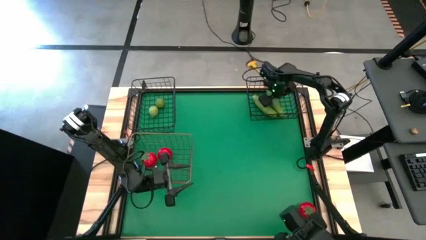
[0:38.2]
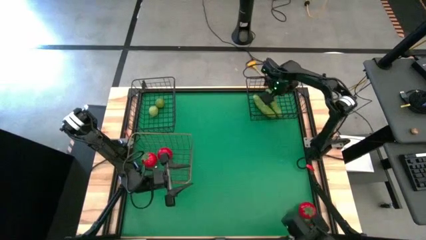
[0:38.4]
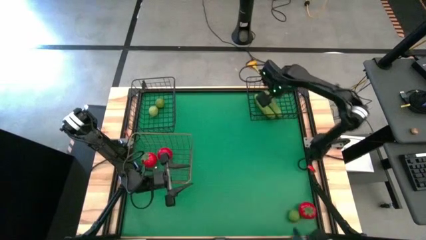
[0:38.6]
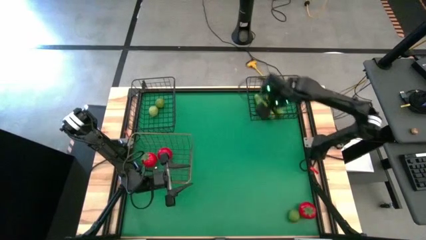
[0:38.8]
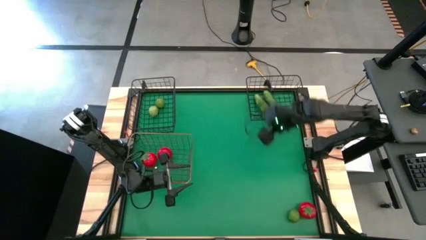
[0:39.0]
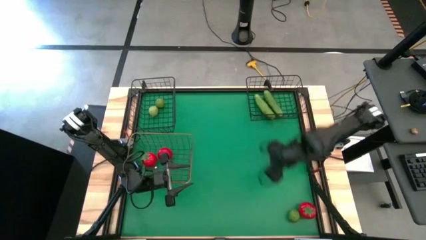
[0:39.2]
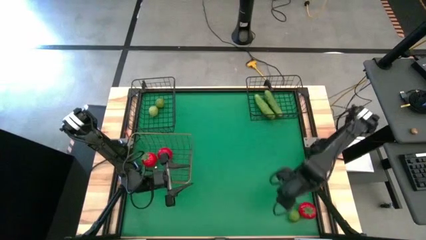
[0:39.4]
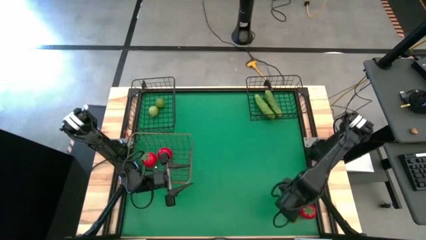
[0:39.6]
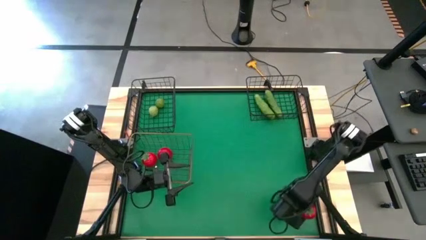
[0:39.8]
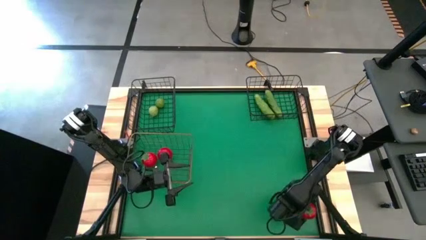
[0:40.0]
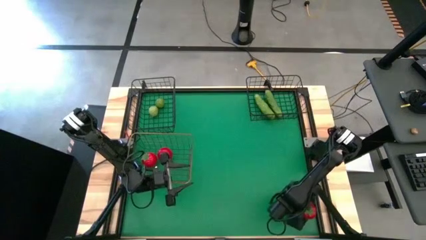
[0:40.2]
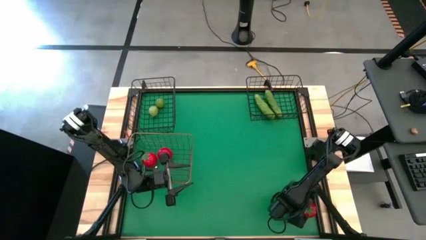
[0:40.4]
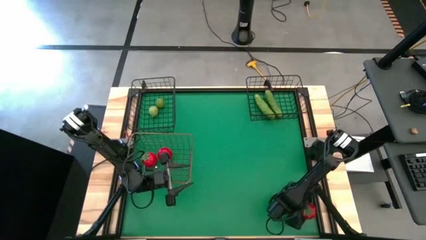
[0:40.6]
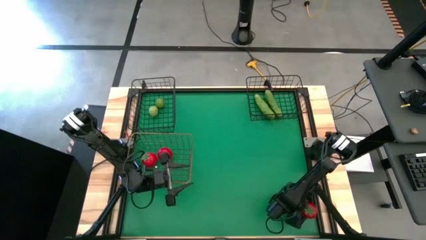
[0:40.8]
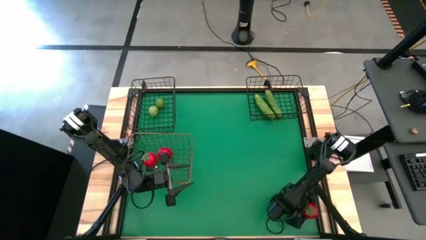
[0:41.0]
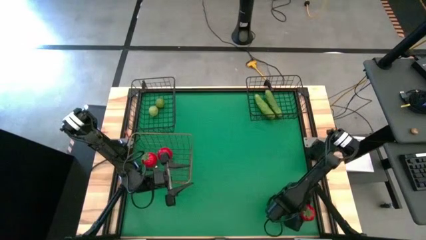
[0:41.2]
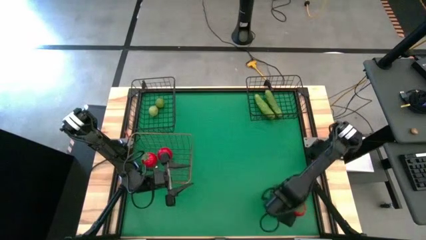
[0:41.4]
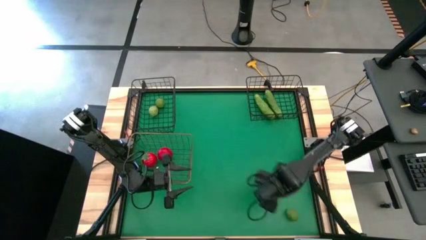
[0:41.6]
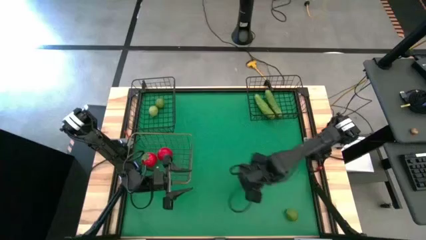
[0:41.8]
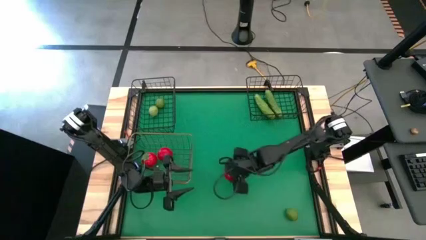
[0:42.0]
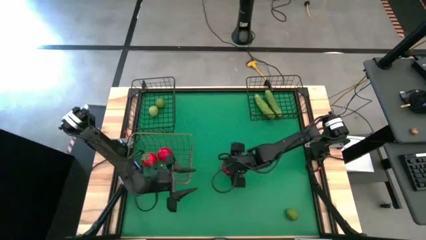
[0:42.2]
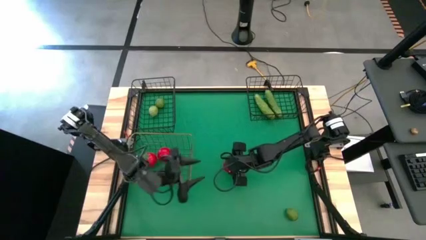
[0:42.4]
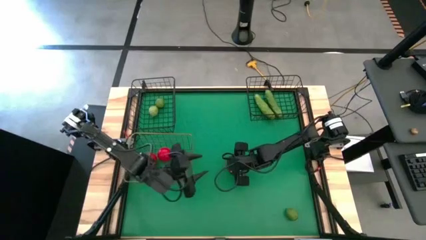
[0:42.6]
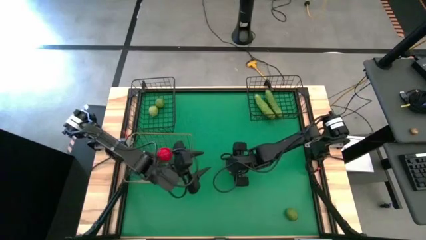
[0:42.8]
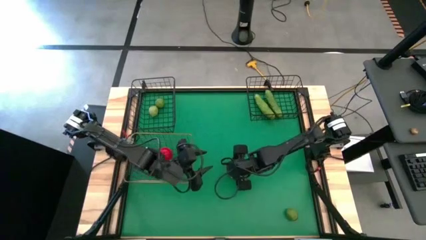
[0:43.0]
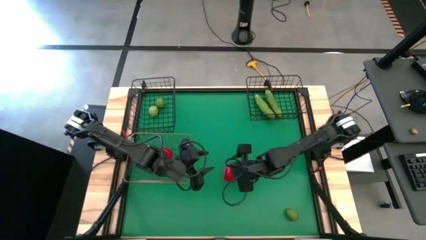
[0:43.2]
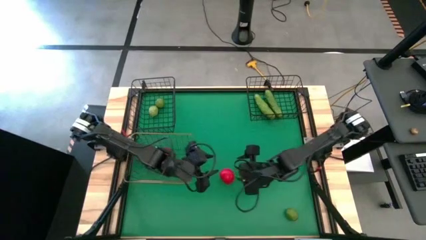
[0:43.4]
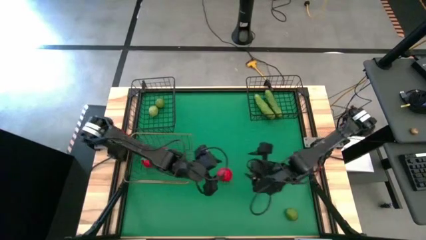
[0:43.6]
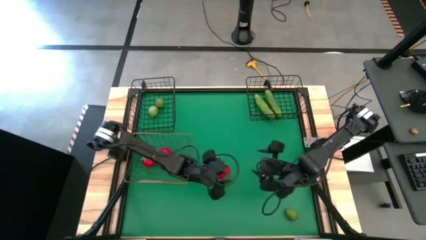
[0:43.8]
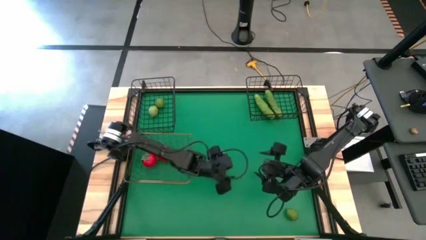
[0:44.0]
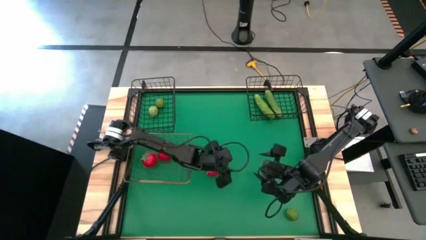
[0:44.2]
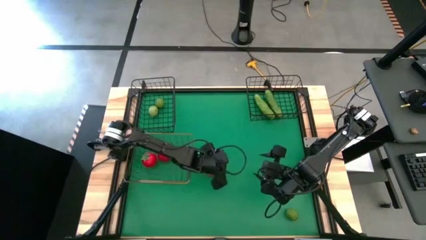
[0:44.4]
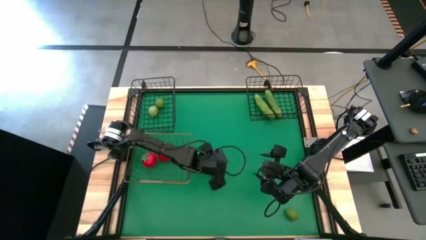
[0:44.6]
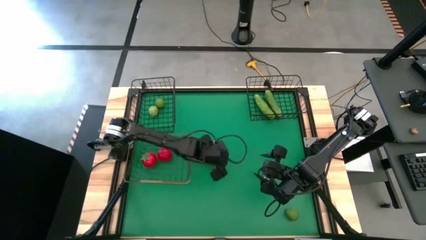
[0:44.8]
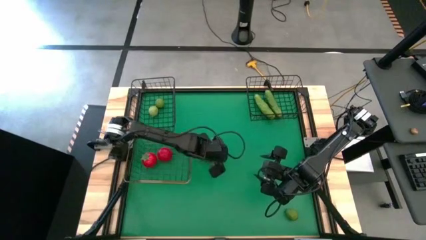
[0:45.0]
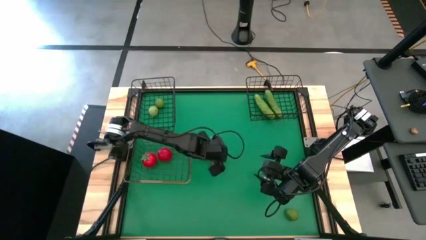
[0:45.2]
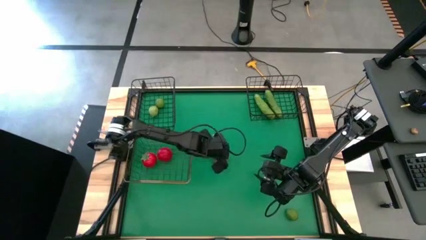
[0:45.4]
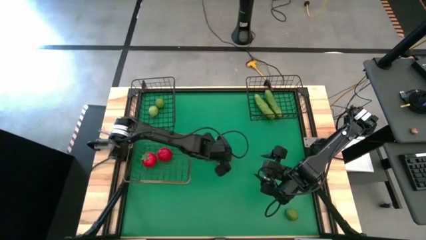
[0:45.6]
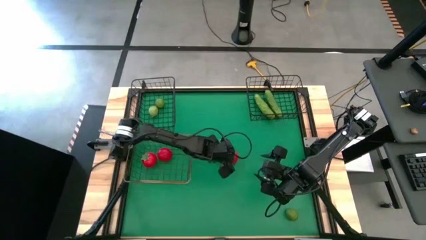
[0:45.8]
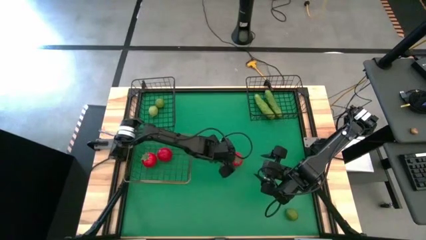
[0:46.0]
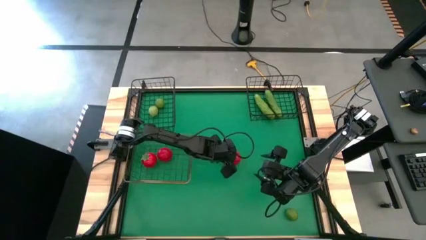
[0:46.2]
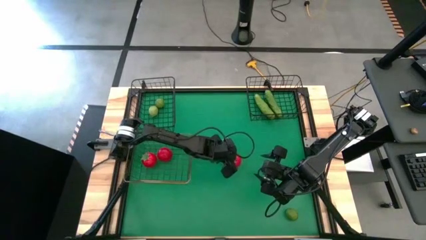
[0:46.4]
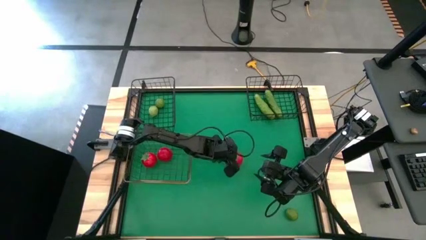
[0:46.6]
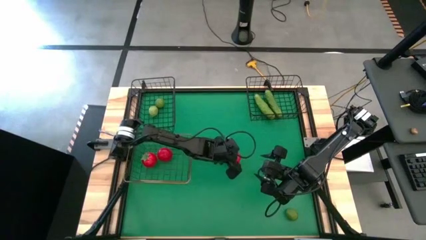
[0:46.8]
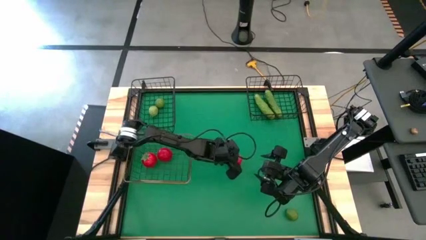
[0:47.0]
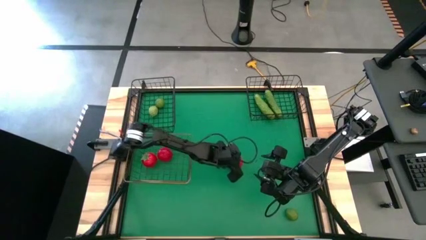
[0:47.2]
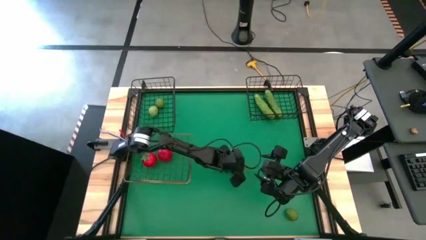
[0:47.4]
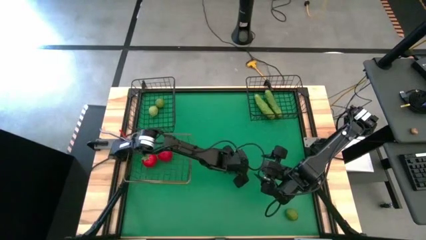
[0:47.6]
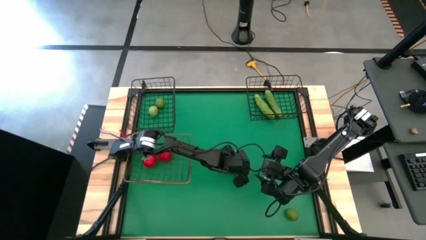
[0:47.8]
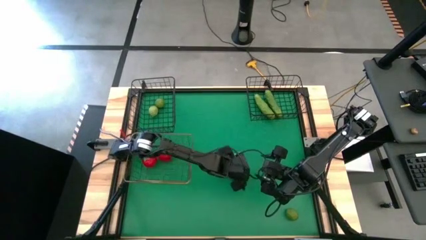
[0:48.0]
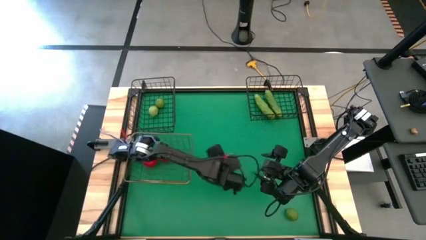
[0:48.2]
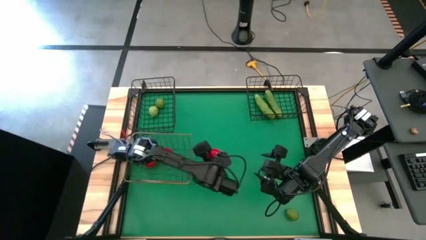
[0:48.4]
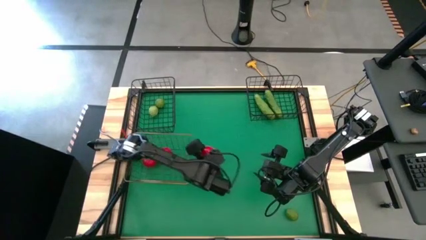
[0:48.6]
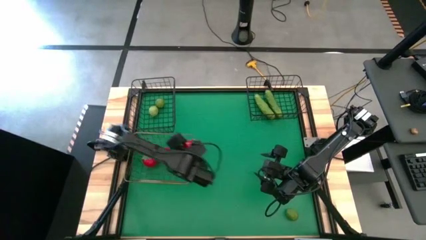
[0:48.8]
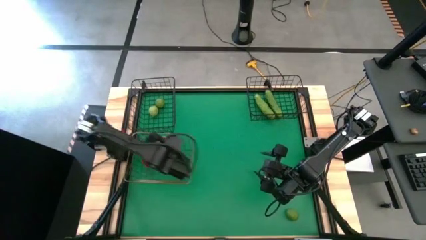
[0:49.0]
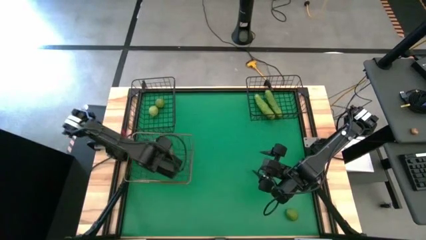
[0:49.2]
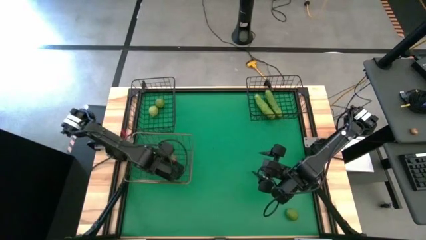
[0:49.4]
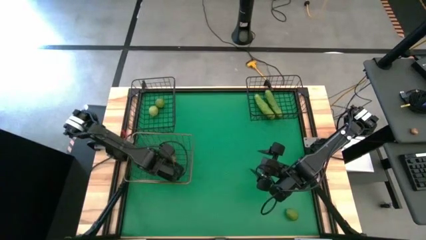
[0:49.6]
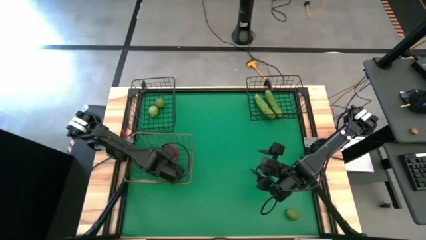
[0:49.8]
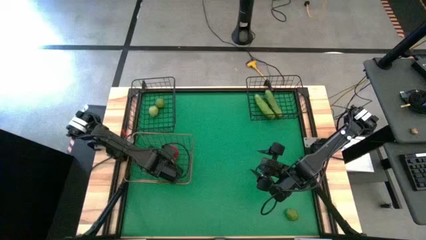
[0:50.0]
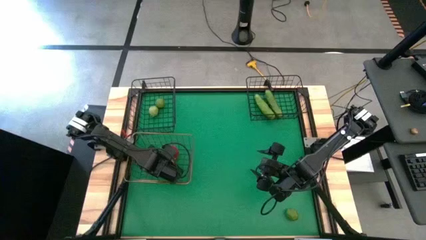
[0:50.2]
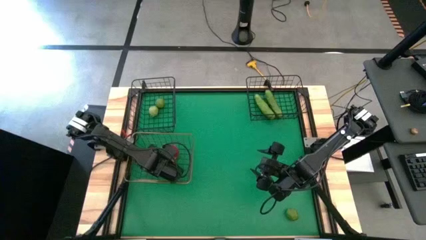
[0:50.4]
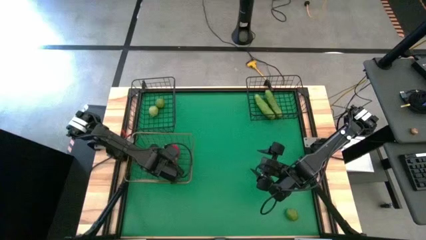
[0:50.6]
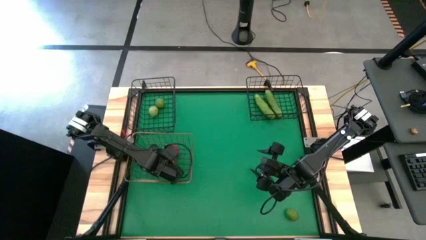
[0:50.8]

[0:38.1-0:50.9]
Task: Sort produce into baskets
Put the tomato into the golden wire basket

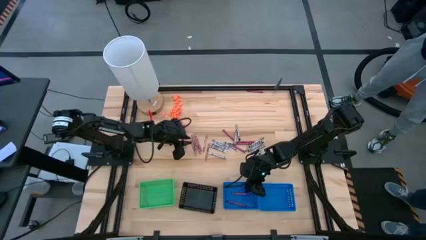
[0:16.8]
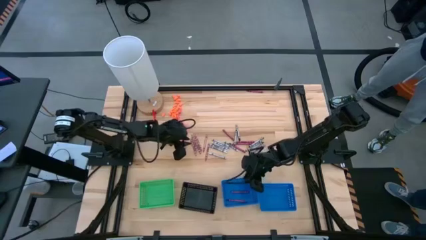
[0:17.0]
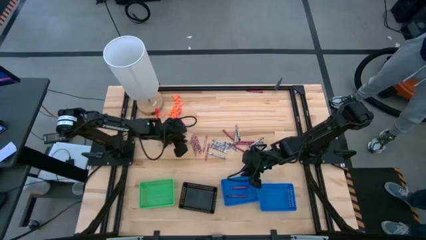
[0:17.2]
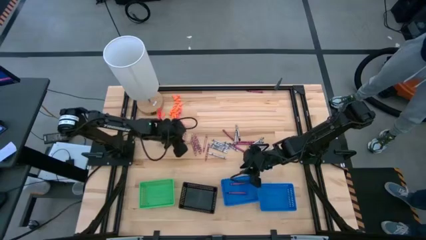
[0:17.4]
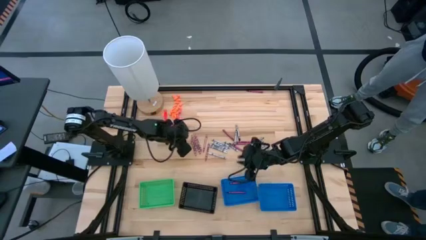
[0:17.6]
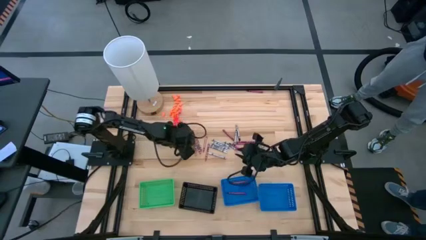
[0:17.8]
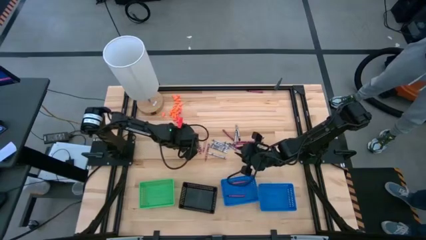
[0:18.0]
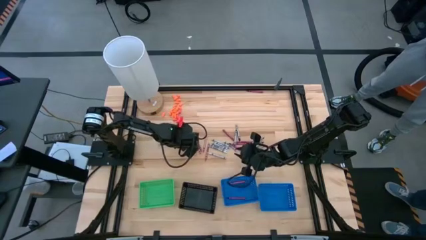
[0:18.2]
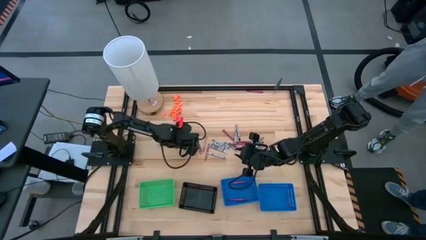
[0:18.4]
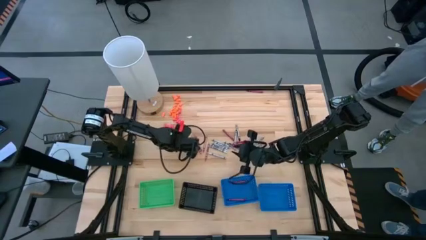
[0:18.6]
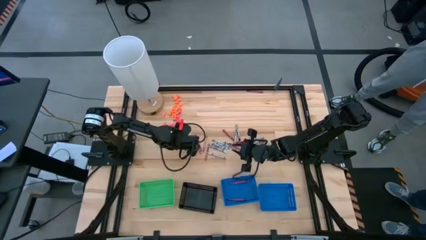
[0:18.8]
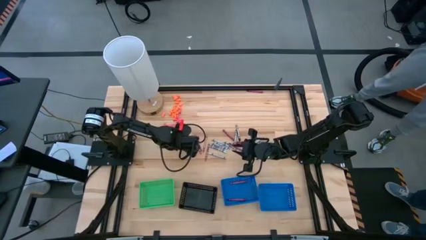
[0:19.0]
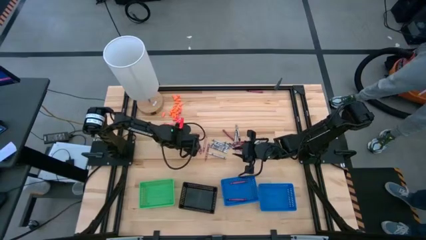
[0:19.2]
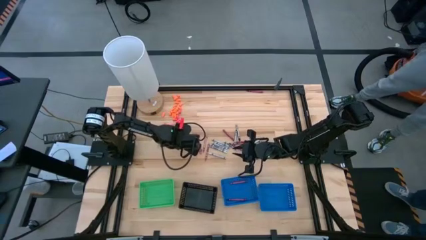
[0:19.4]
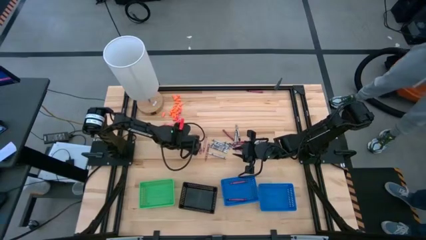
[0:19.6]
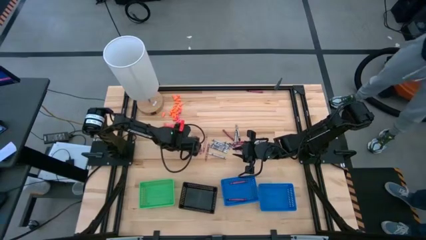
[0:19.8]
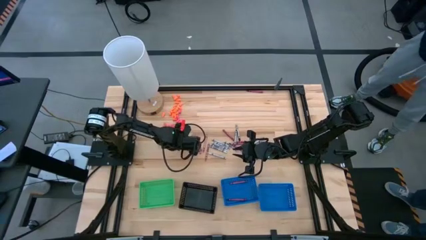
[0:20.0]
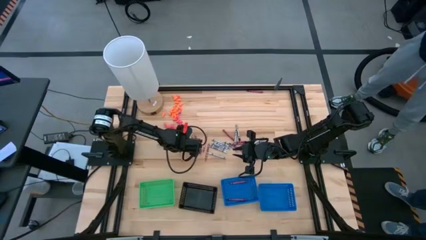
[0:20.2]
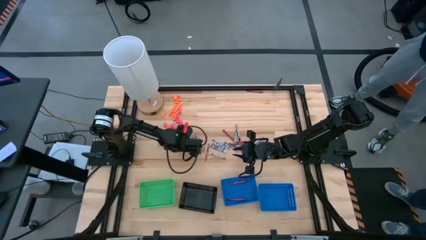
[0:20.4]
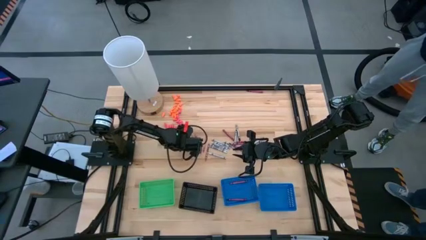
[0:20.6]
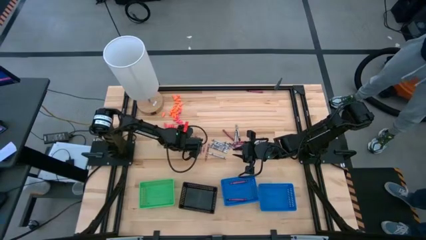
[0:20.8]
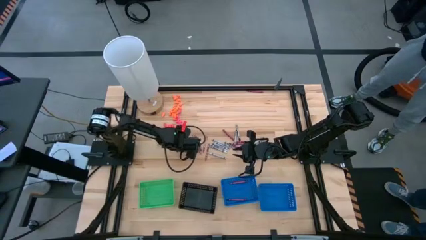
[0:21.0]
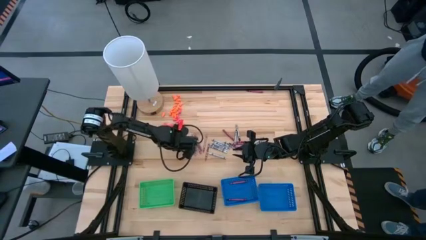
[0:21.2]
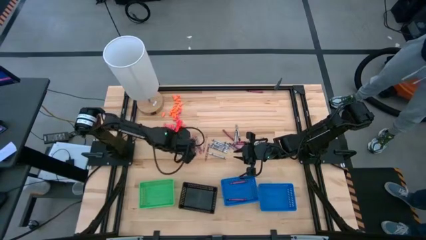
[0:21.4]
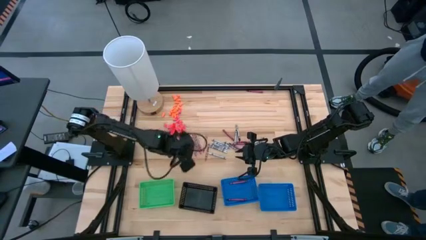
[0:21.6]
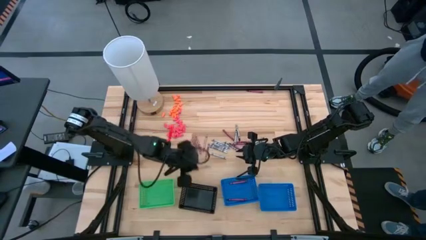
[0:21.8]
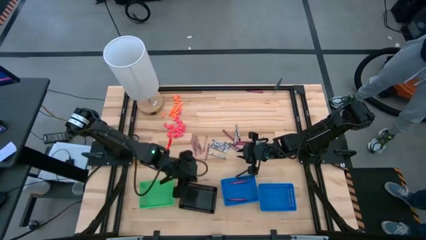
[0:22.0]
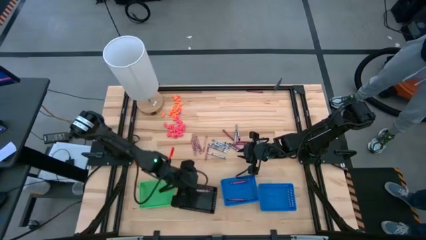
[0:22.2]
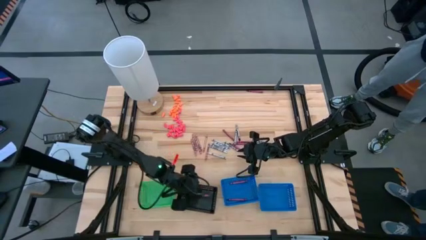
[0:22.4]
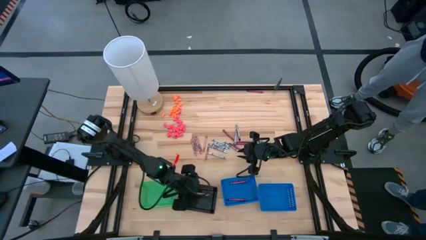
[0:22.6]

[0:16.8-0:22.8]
Task: Sort crayons
Put the pink crayon into the black bin
